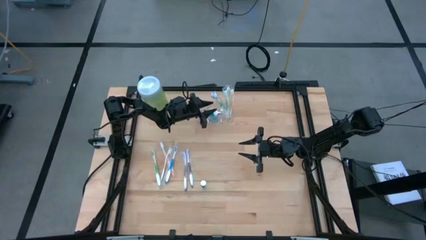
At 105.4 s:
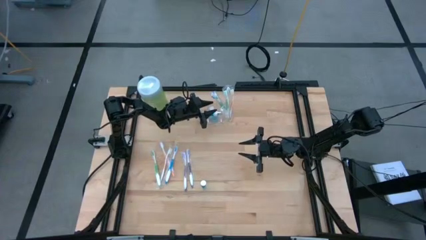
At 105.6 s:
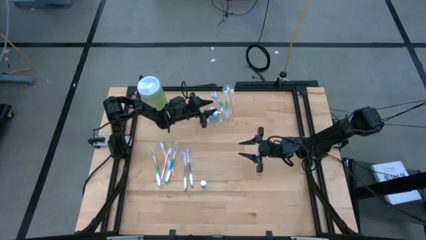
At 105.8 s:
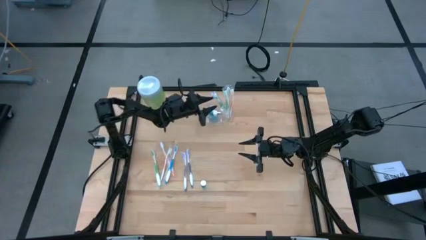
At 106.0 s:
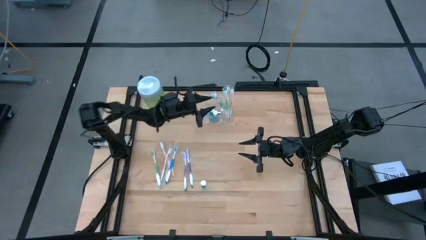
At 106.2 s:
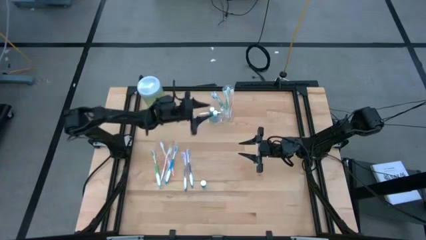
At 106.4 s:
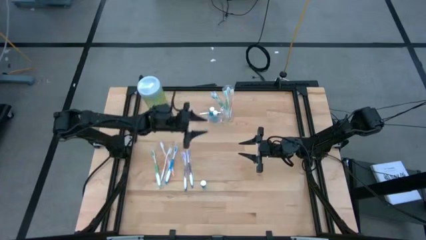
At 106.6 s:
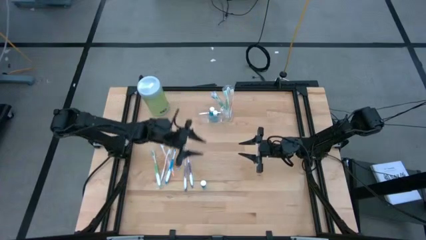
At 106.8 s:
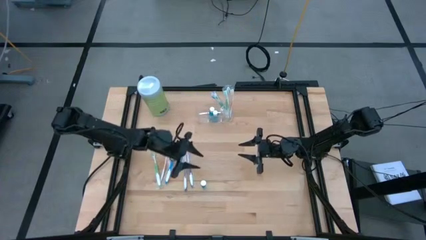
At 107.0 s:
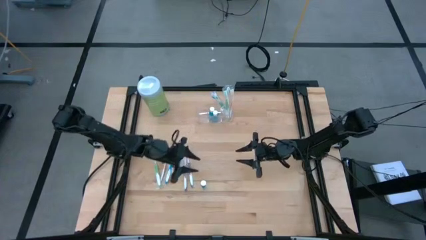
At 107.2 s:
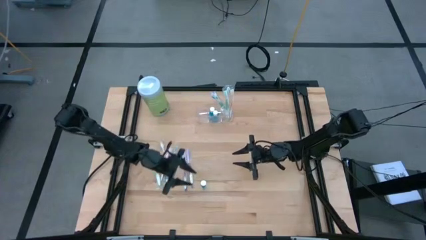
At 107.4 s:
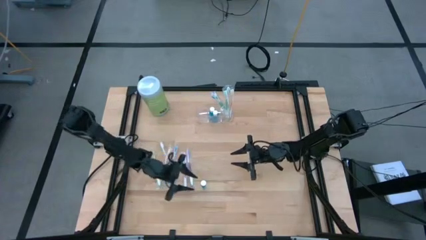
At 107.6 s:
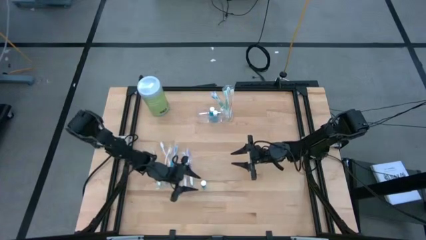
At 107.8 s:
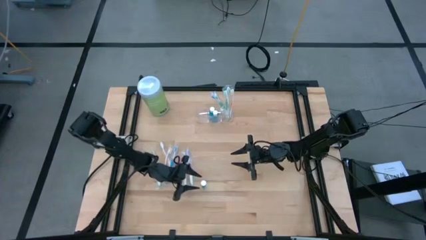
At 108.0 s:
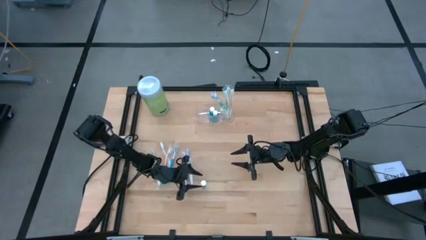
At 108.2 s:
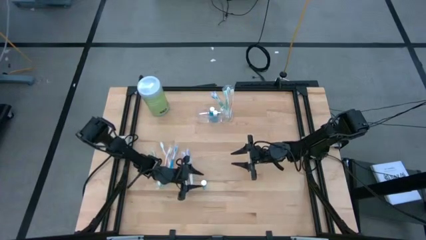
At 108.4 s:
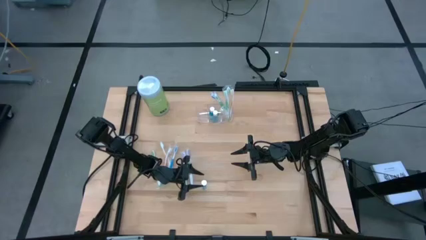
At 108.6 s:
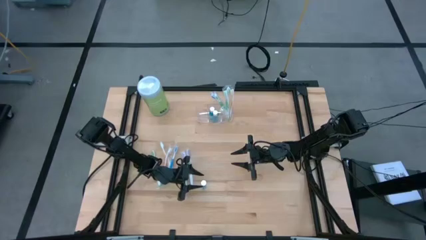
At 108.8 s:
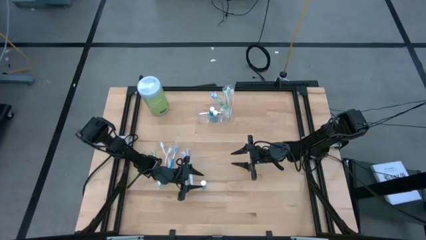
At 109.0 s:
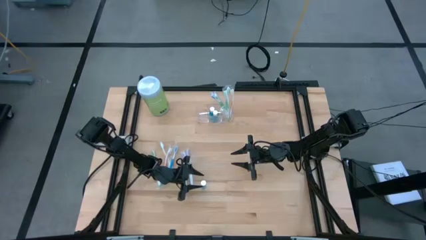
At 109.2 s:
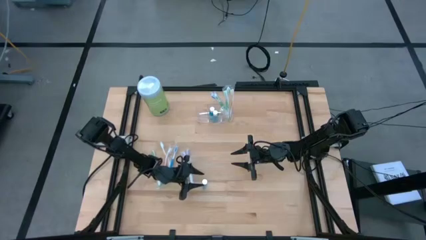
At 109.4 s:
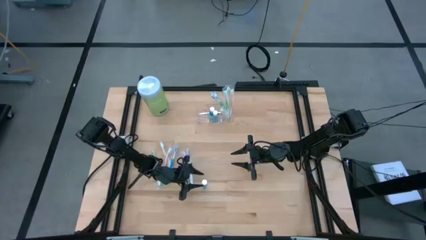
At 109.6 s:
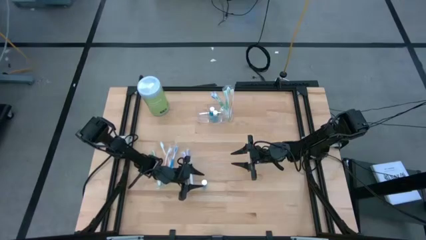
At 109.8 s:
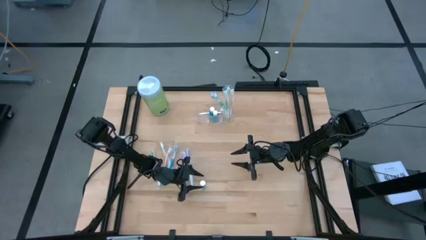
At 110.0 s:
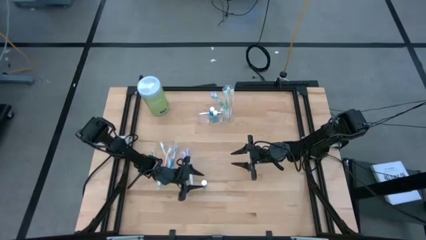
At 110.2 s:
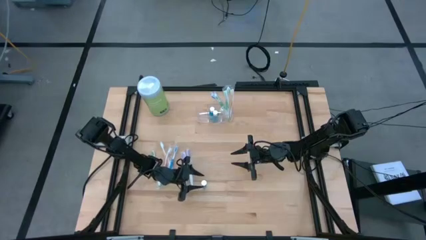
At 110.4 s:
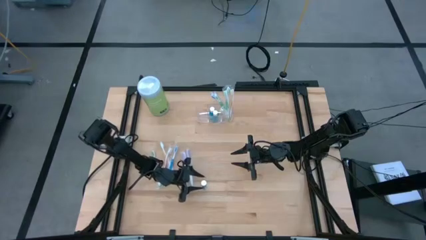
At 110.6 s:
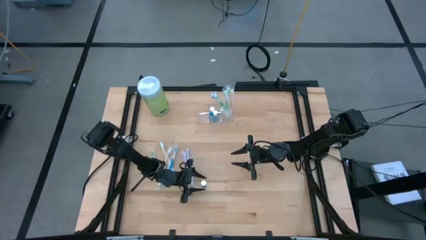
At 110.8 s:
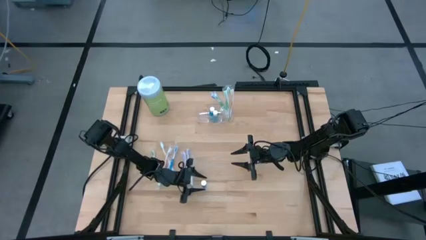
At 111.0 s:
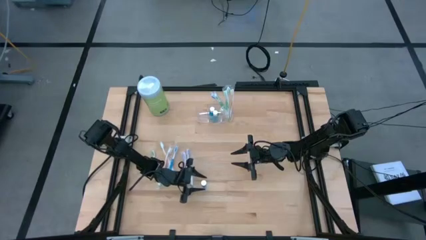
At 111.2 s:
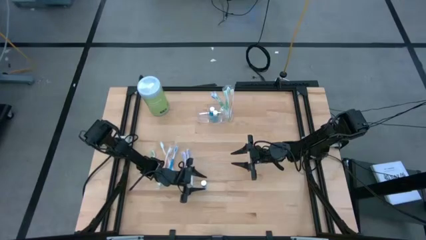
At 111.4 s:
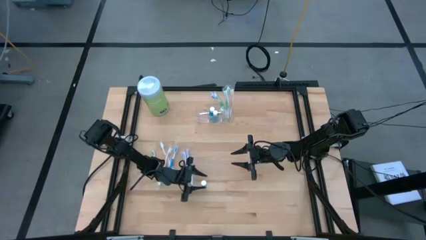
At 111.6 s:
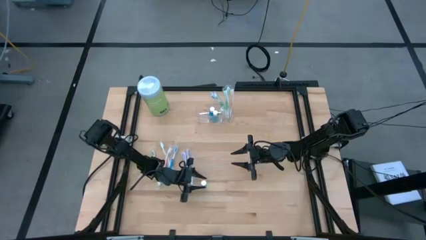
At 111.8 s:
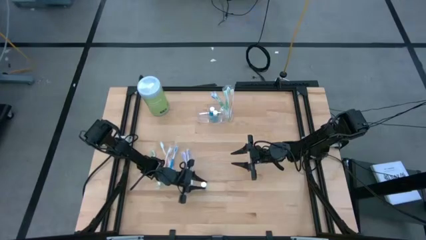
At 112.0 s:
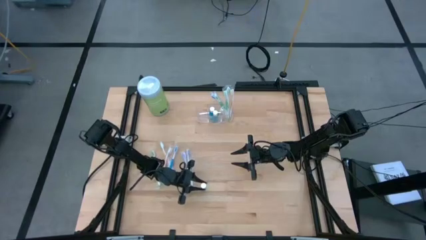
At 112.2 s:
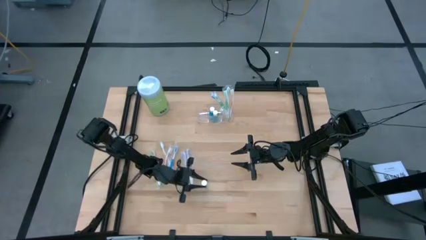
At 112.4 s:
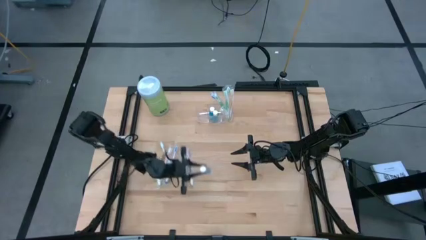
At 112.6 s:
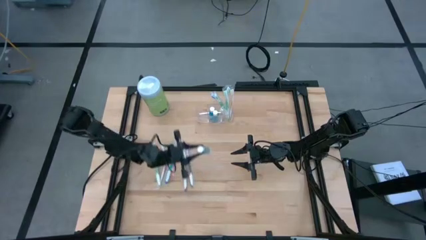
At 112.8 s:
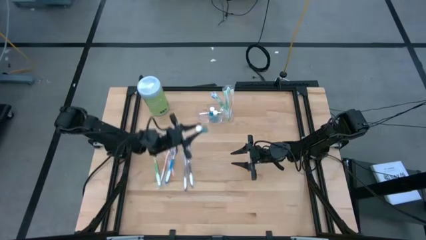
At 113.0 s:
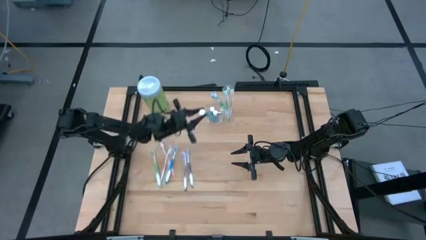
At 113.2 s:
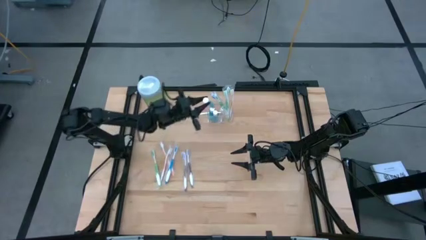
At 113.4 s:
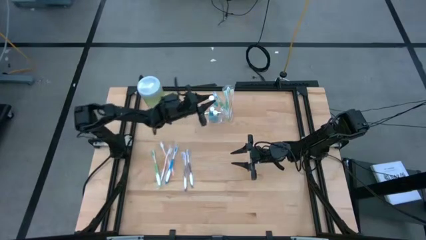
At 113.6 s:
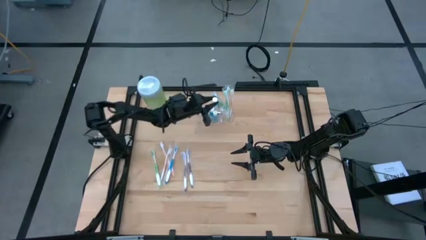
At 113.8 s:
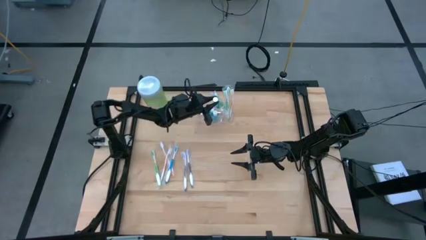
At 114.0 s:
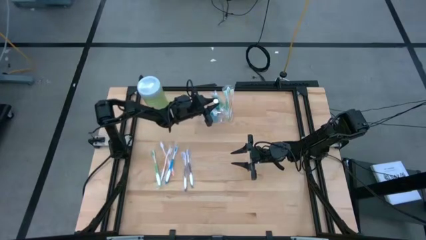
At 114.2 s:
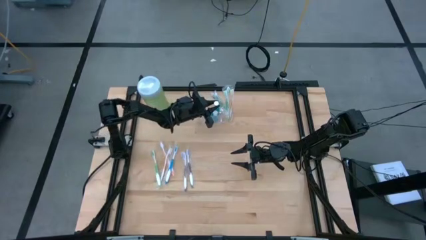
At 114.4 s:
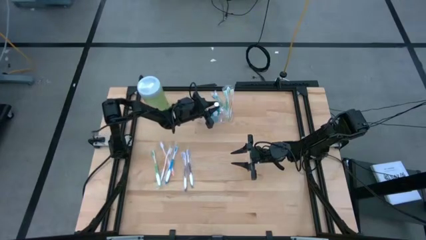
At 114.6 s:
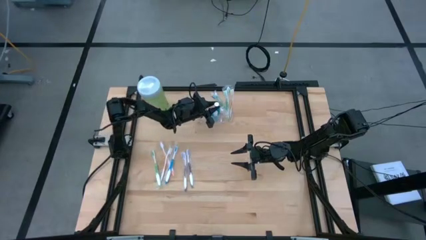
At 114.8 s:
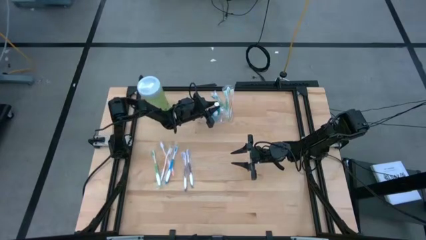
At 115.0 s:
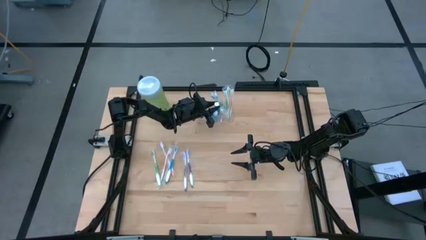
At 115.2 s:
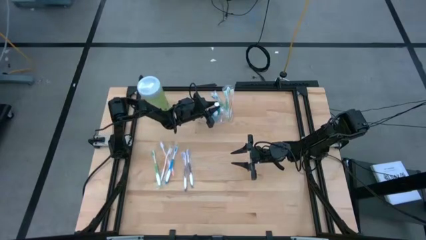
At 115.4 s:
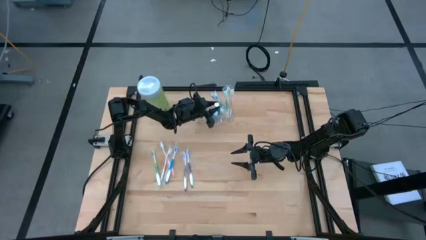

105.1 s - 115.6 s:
Task: Pick & Place toothbrushing station
Put the blue mouthwash into the transparent organizer

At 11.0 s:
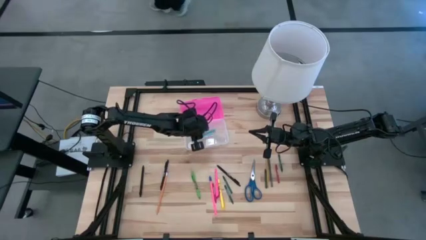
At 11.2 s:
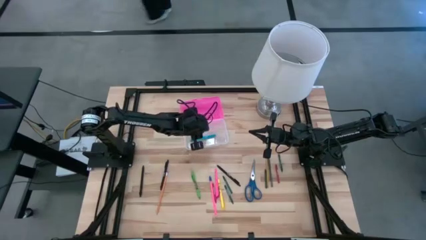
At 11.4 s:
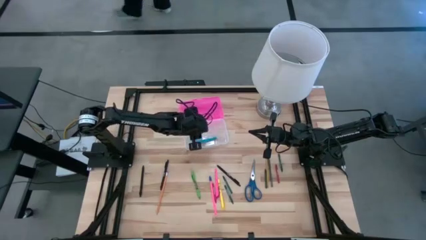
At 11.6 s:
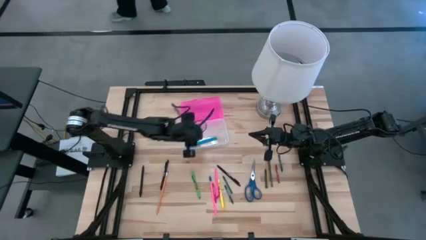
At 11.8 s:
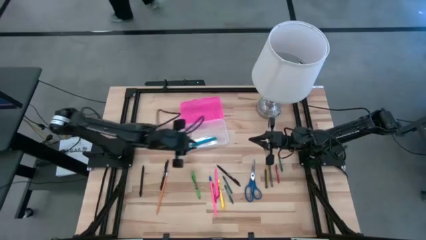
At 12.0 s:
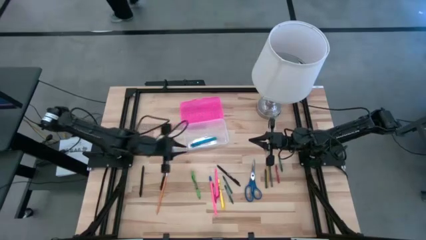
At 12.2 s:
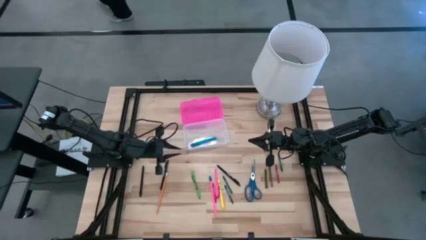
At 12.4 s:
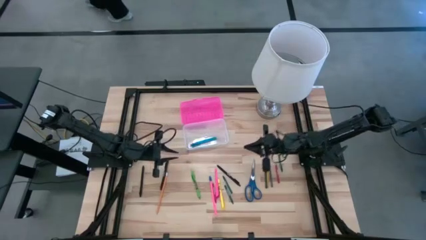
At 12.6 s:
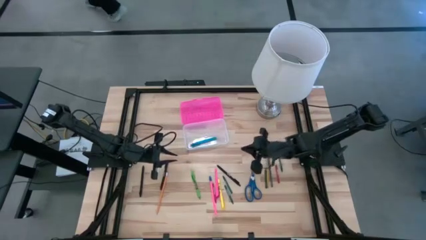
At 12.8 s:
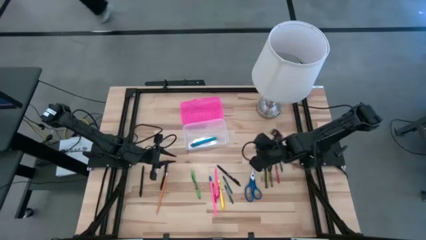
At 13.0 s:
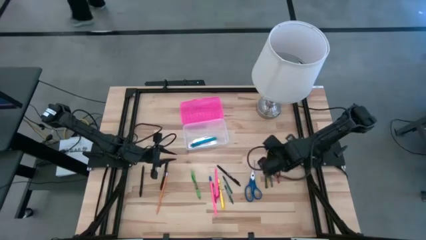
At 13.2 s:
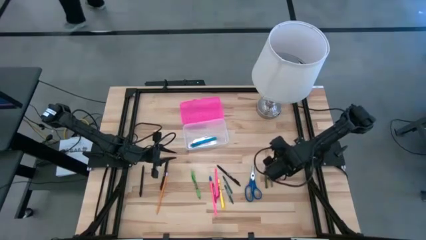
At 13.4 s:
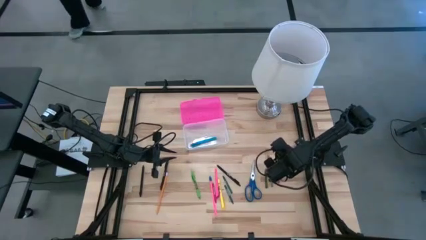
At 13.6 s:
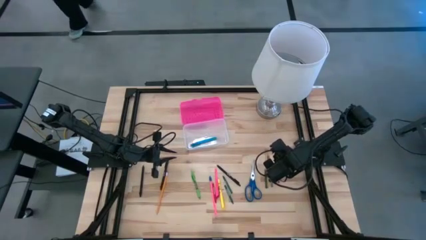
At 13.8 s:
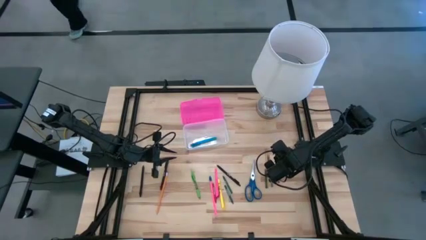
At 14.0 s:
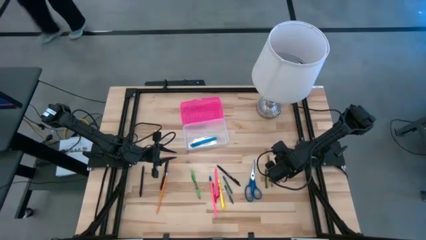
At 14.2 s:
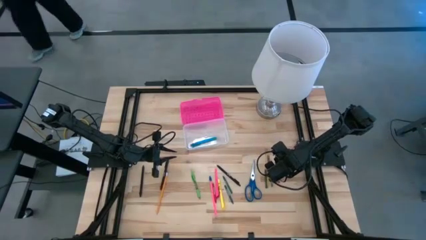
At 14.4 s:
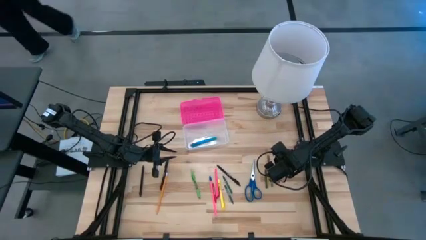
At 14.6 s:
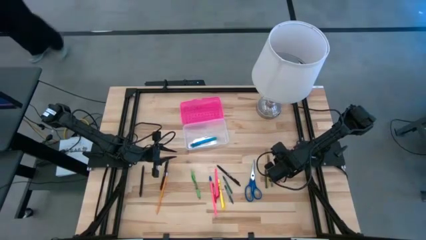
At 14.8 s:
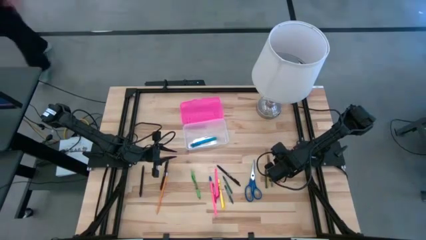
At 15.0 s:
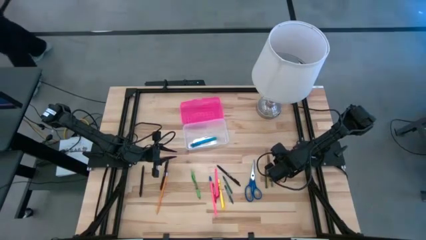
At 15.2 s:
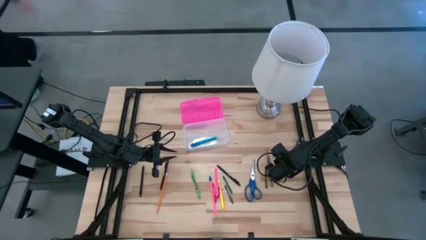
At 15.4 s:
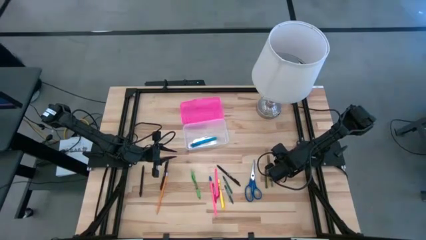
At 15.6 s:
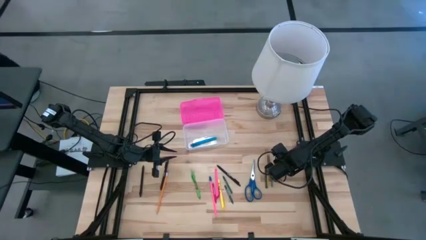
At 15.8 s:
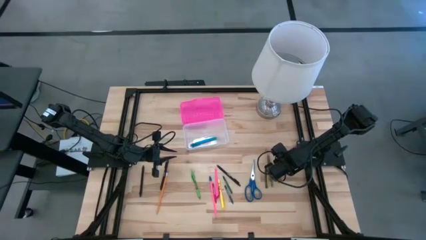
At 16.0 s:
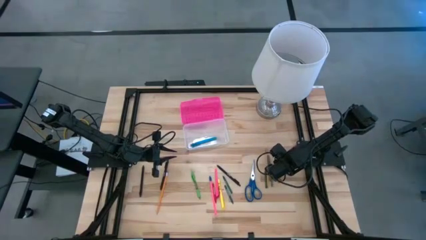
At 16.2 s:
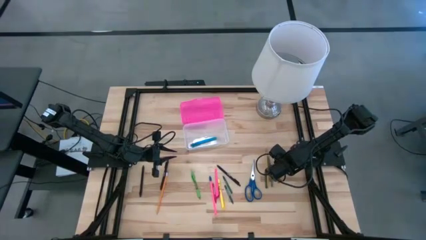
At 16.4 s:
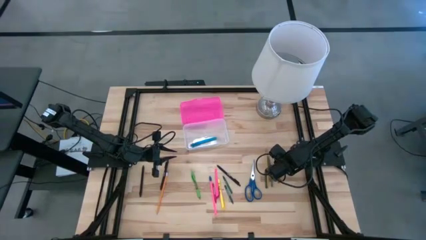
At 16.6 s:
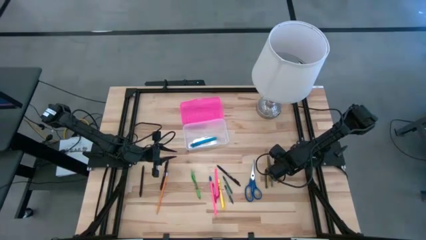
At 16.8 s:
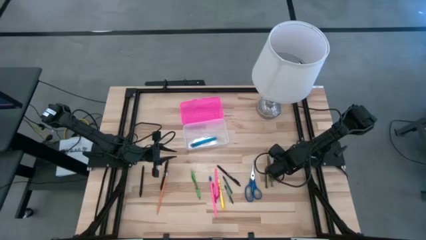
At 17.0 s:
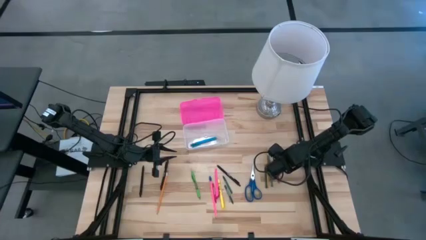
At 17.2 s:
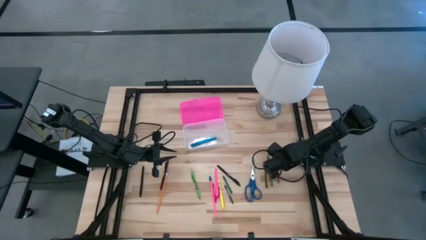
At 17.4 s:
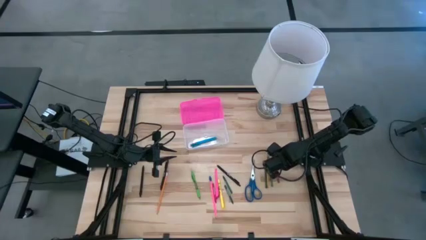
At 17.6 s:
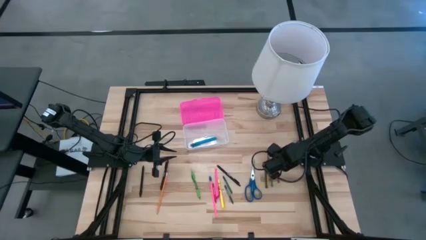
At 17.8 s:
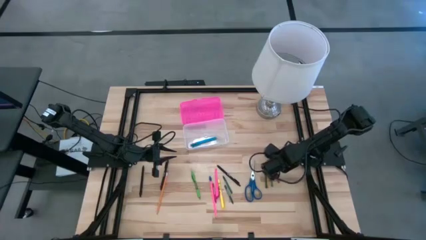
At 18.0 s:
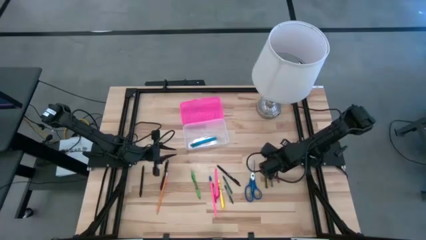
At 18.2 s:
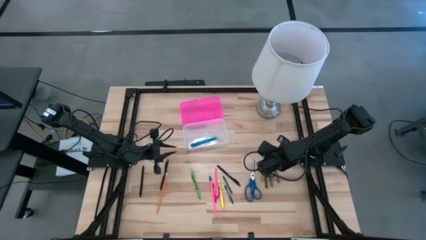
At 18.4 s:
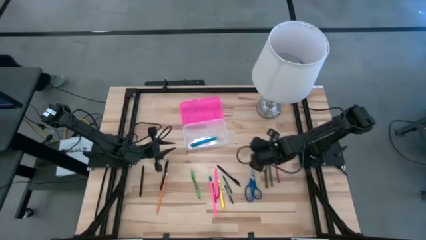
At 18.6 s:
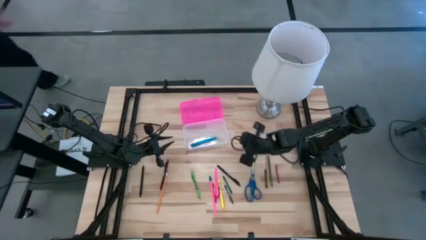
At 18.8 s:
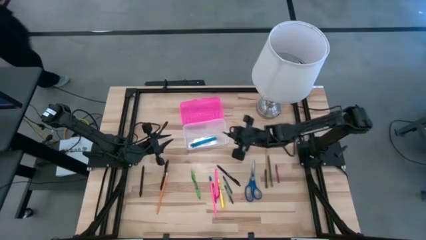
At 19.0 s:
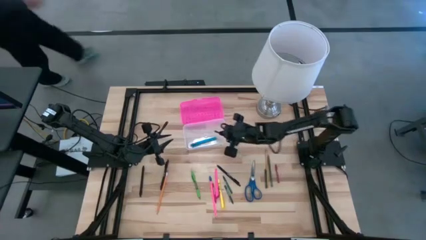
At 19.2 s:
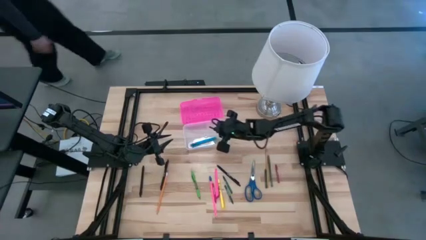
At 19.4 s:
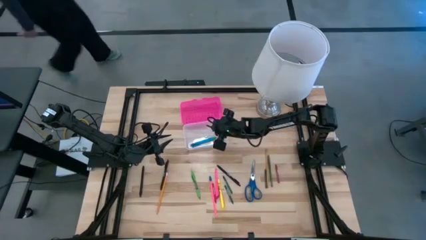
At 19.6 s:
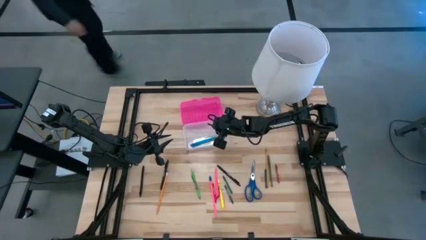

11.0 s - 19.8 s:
Task: Pick & place school supplies into a supply box
Put the green crayon into the pink supply box
